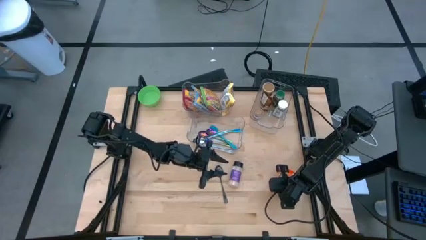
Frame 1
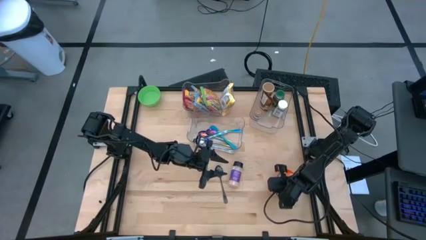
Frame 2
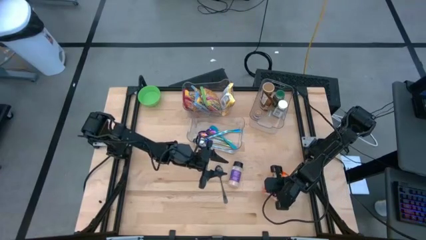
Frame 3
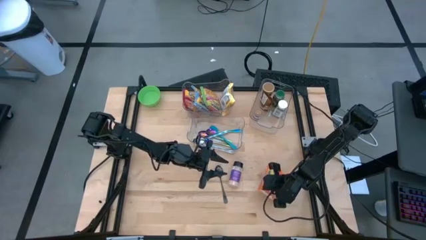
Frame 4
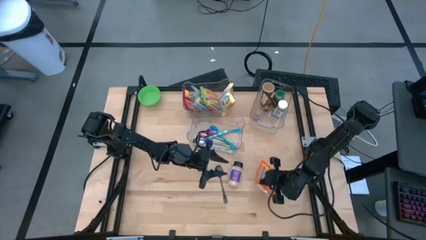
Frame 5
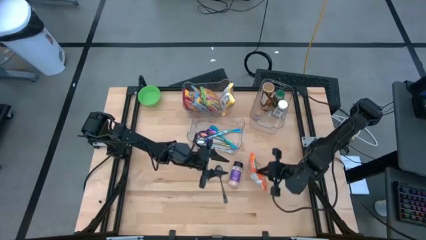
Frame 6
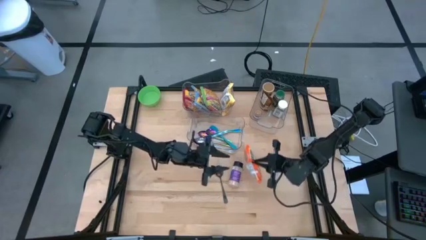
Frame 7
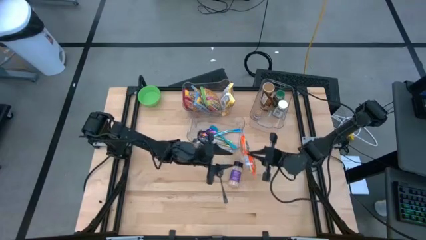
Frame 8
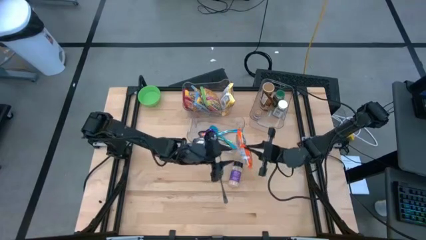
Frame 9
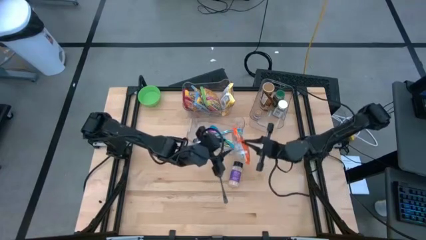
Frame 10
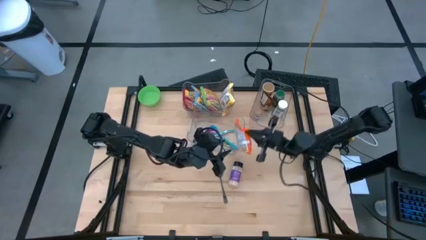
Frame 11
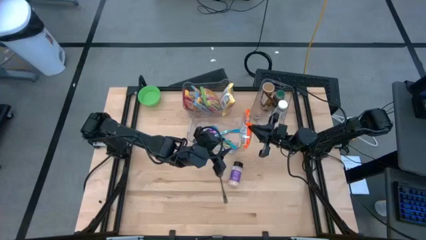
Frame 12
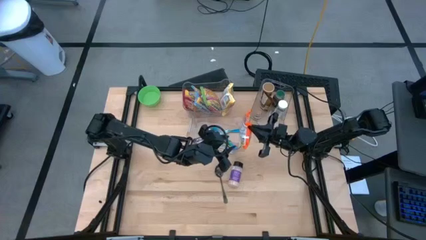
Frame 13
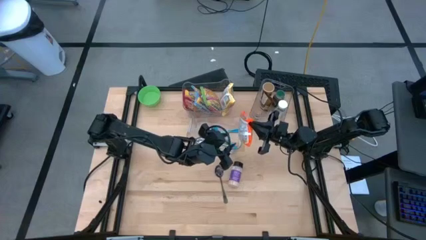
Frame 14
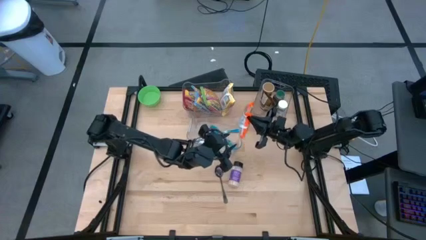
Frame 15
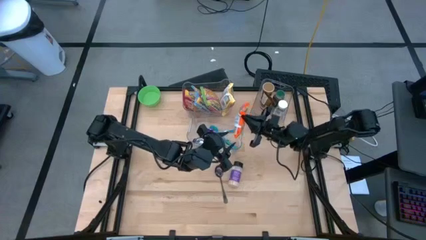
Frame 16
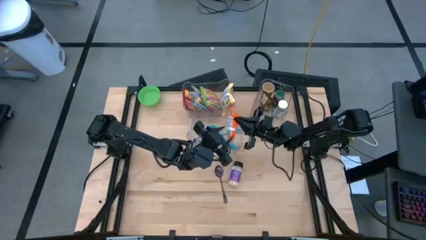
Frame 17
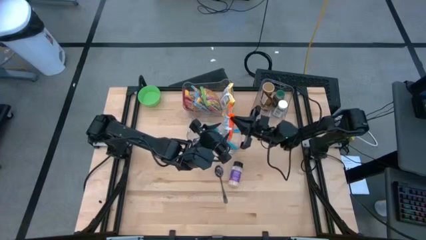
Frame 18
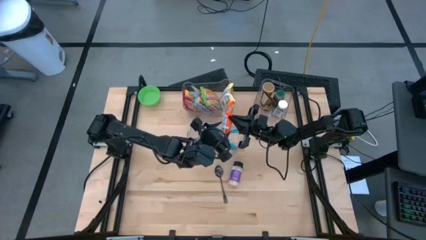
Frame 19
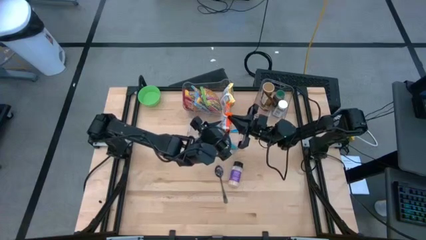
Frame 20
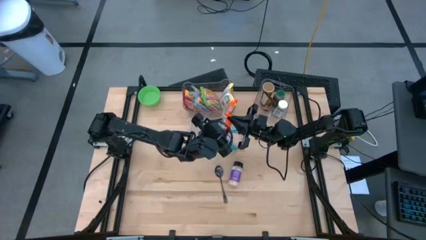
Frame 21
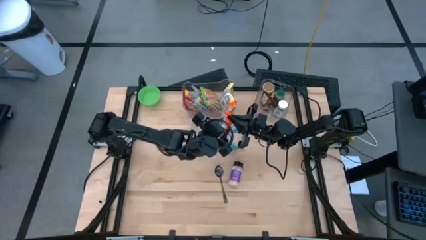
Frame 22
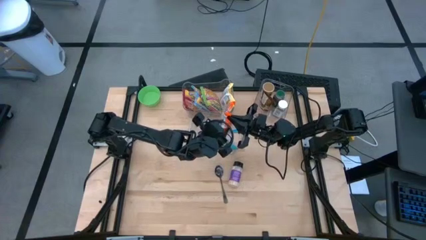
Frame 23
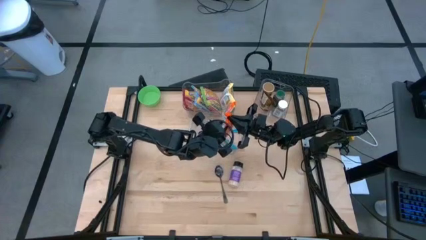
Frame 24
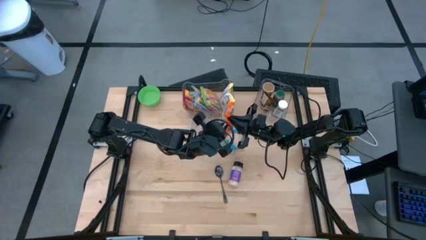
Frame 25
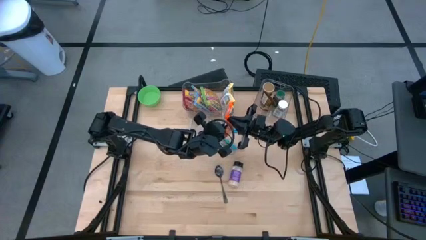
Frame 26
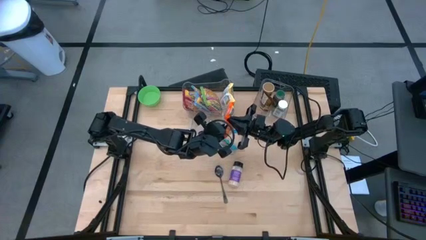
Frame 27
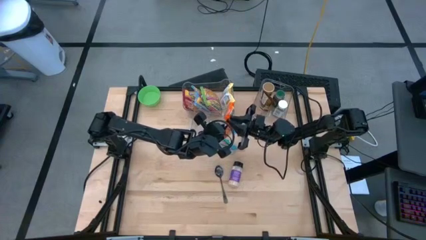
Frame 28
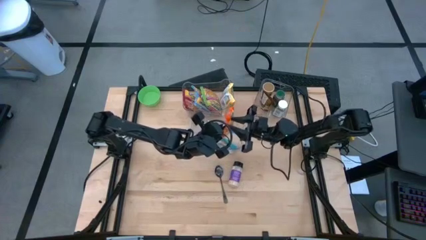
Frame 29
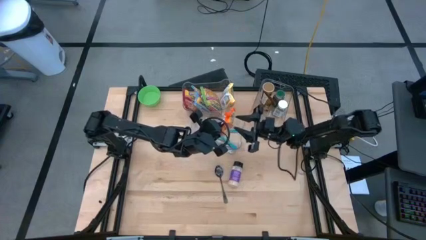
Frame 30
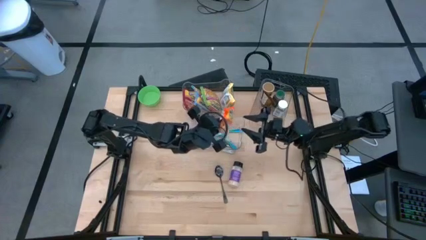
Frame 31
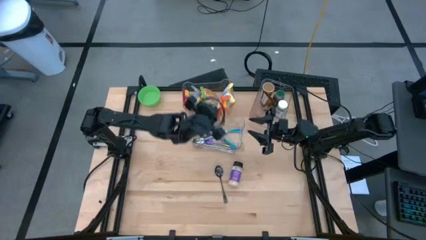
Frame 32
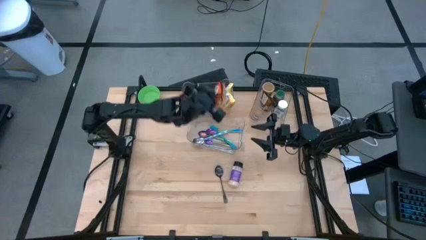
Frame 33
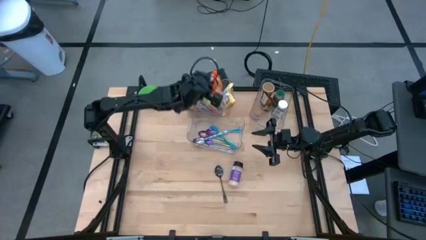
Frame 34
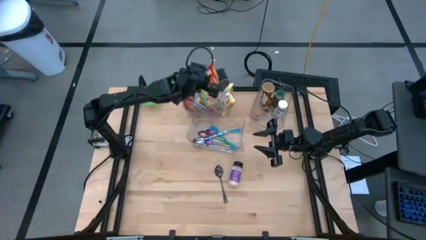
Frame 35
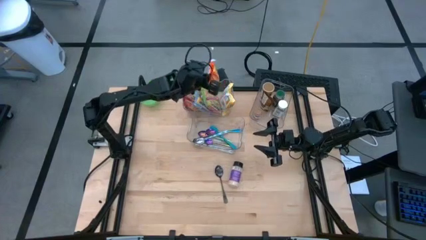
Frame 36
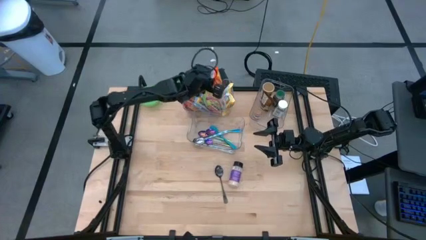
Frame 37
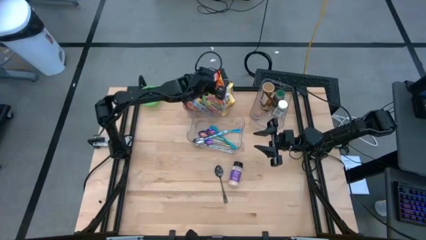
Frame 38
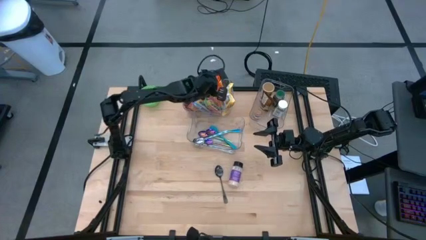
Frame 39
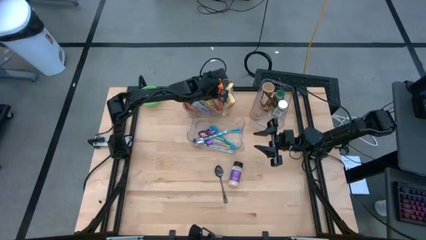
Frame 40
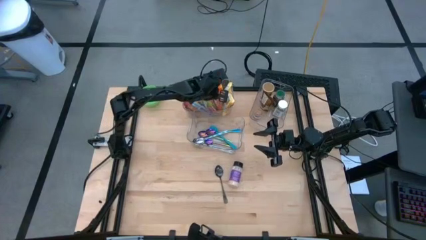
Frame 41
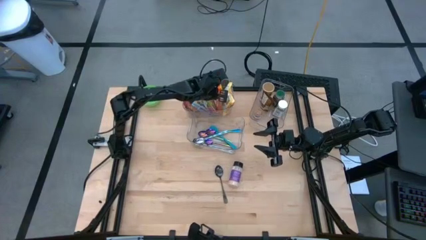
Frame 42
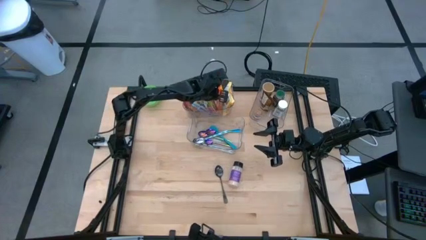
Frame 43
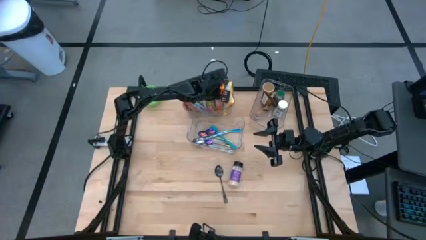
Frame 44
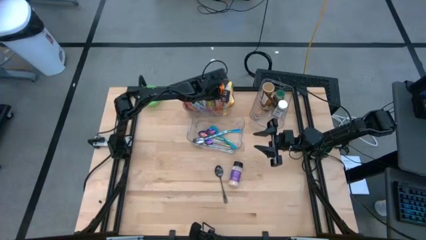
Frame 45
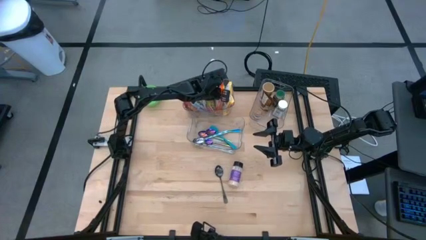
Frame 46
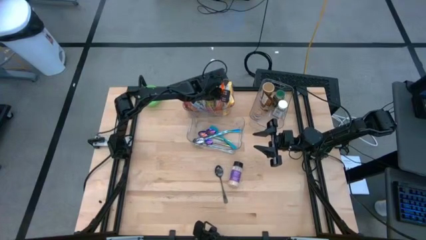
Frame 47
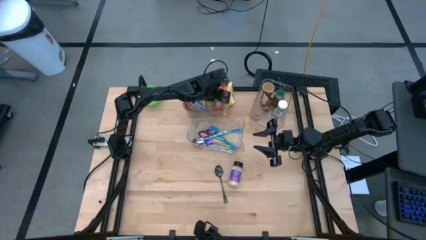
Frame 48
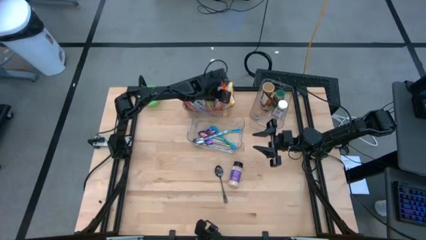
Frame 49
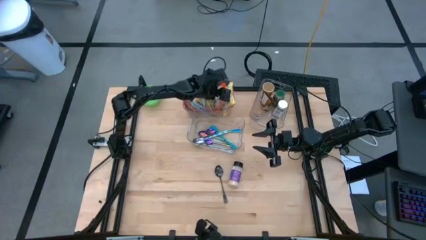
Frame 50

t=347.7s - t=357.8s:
Task: Pick & Place Food Item
Put the orange noodle pack into the top left transparent bin
